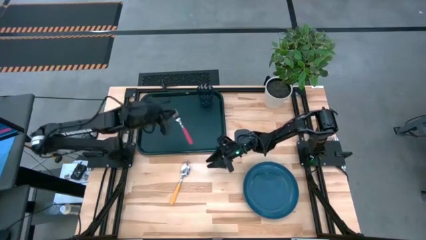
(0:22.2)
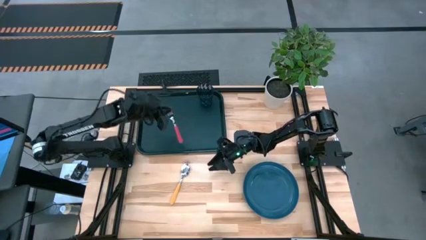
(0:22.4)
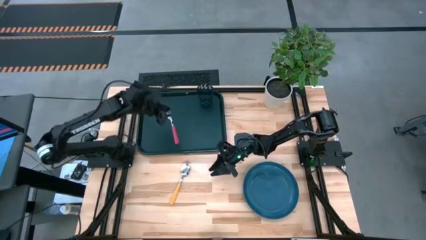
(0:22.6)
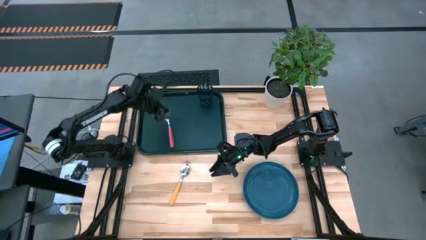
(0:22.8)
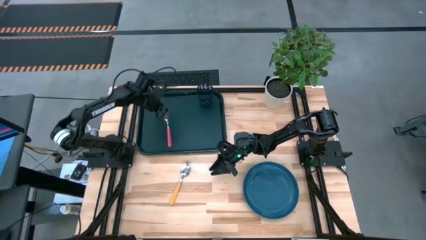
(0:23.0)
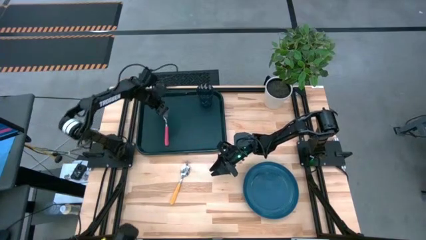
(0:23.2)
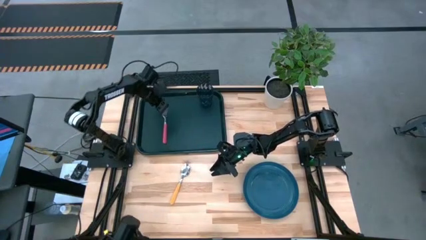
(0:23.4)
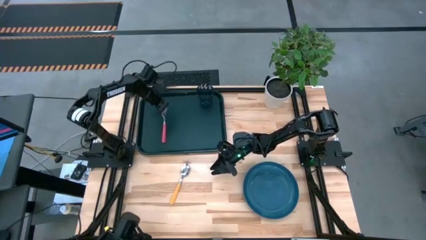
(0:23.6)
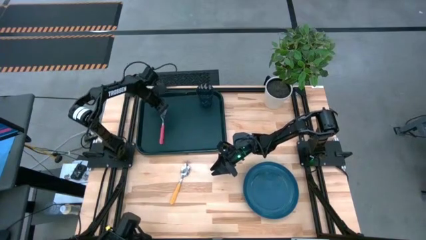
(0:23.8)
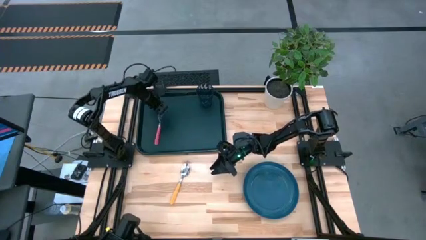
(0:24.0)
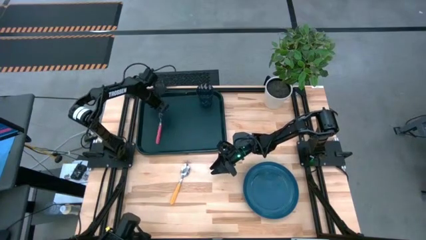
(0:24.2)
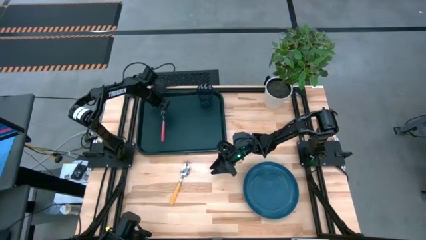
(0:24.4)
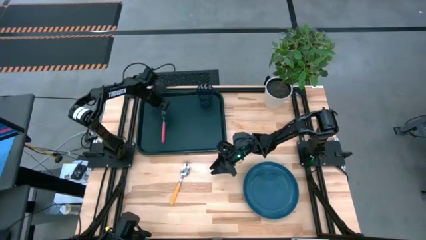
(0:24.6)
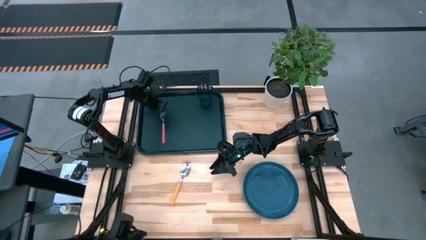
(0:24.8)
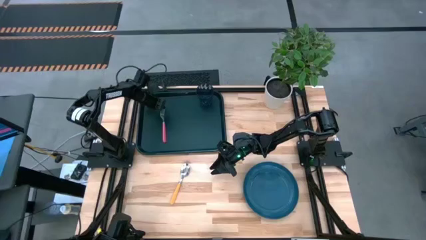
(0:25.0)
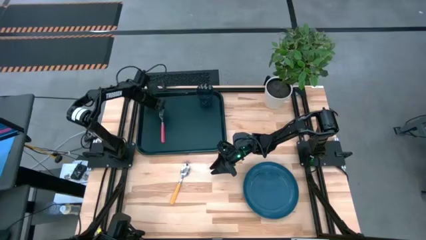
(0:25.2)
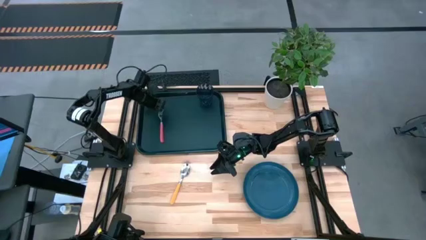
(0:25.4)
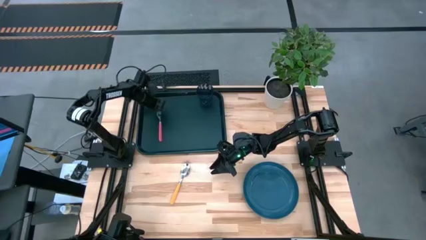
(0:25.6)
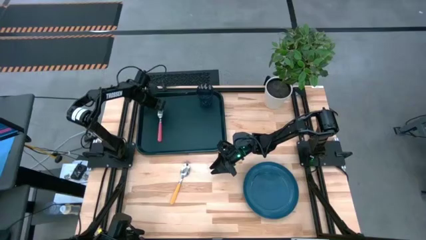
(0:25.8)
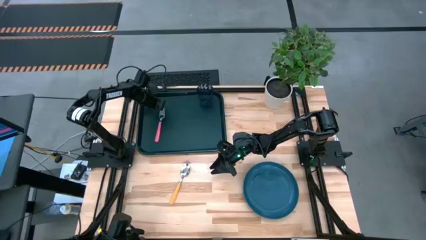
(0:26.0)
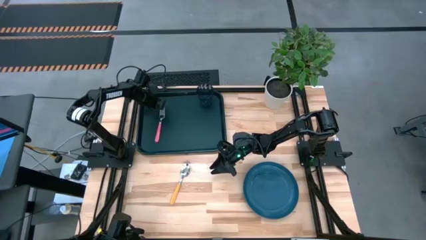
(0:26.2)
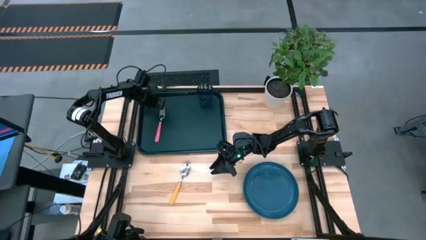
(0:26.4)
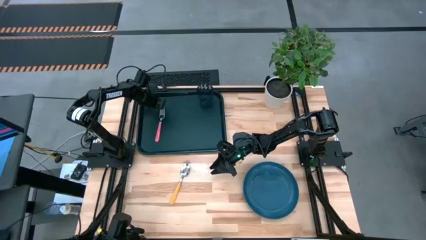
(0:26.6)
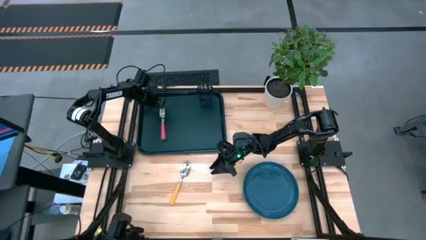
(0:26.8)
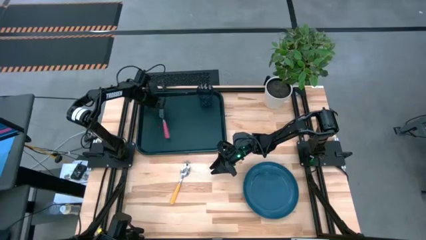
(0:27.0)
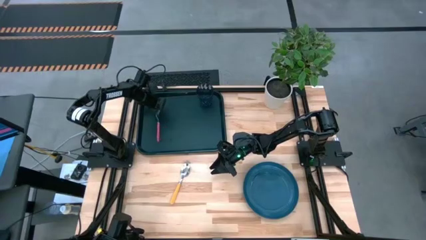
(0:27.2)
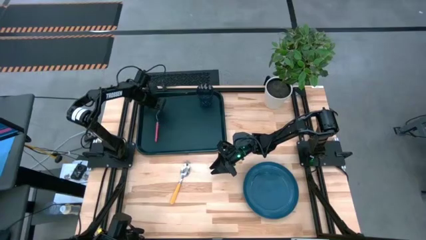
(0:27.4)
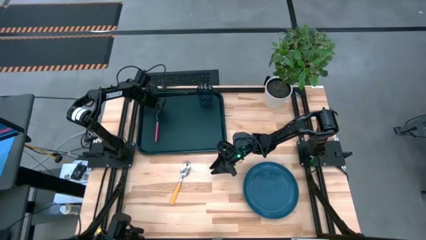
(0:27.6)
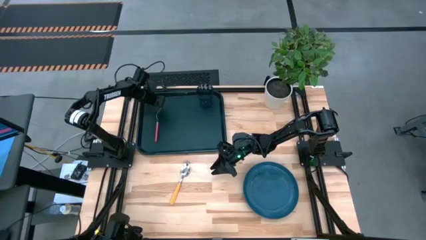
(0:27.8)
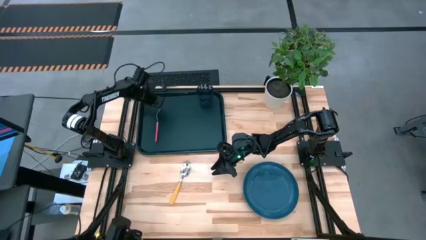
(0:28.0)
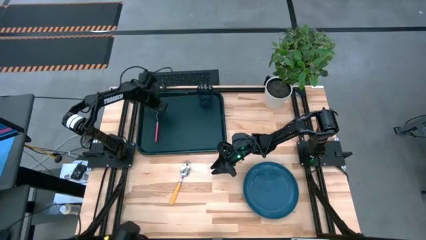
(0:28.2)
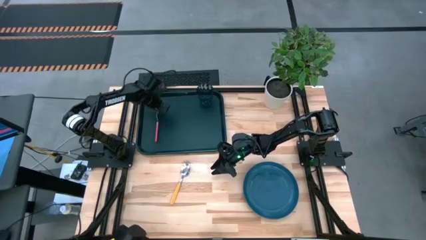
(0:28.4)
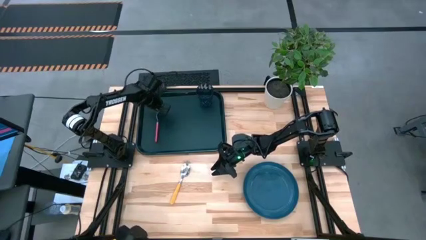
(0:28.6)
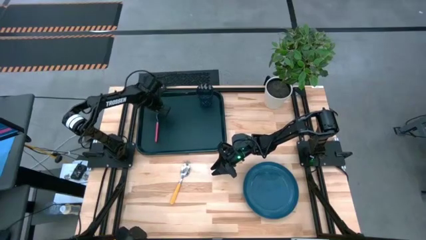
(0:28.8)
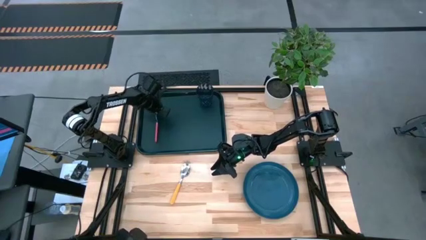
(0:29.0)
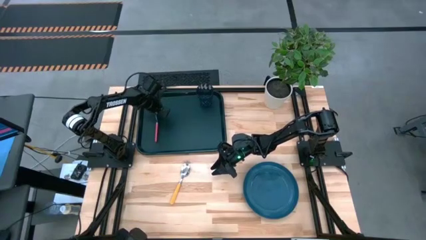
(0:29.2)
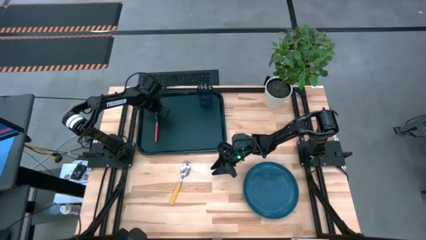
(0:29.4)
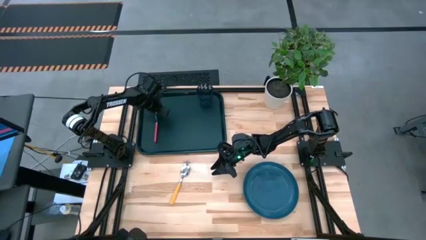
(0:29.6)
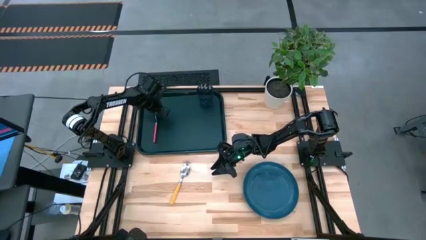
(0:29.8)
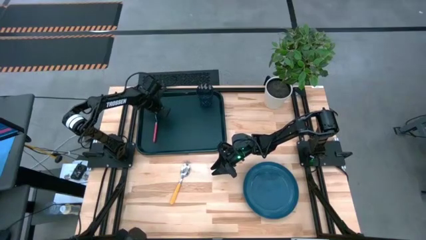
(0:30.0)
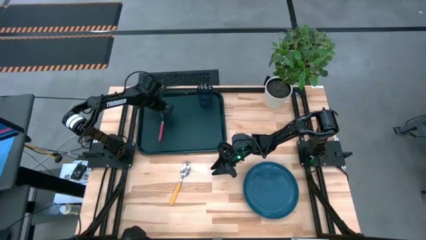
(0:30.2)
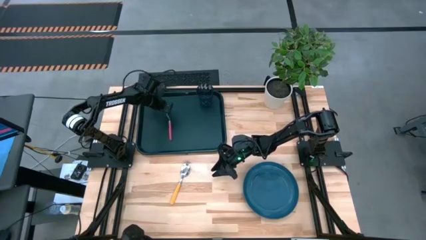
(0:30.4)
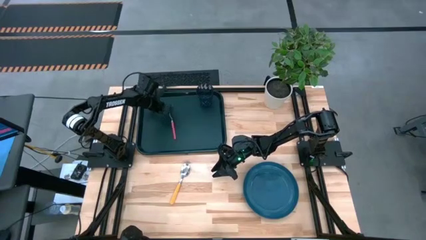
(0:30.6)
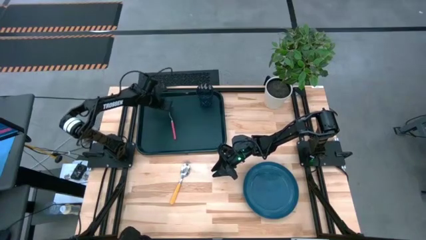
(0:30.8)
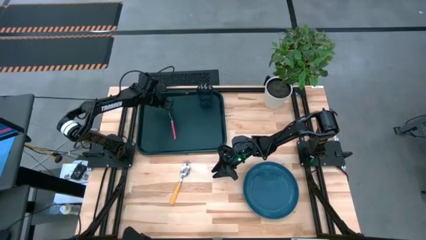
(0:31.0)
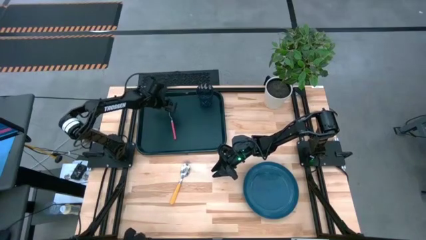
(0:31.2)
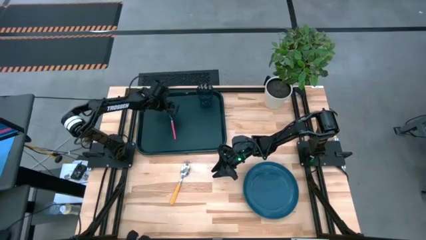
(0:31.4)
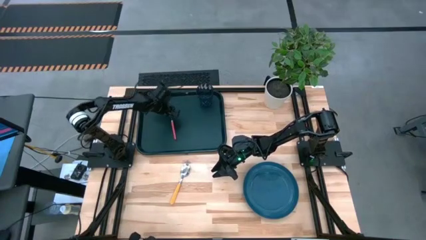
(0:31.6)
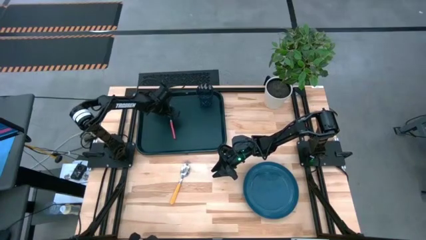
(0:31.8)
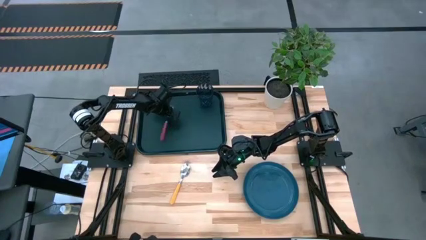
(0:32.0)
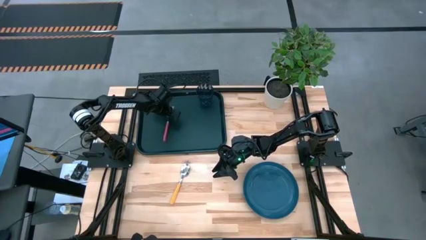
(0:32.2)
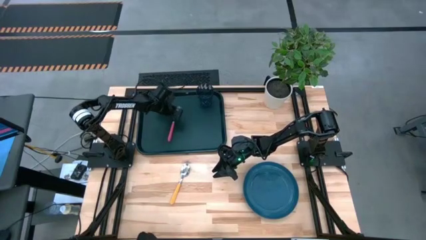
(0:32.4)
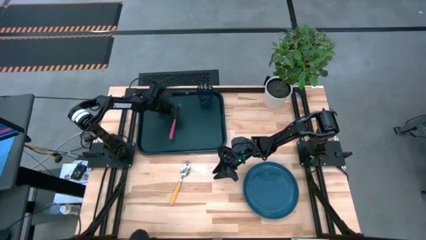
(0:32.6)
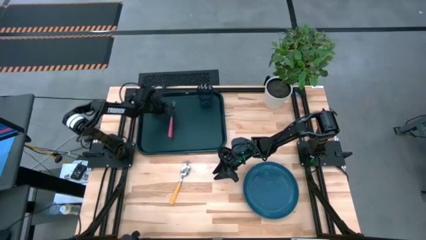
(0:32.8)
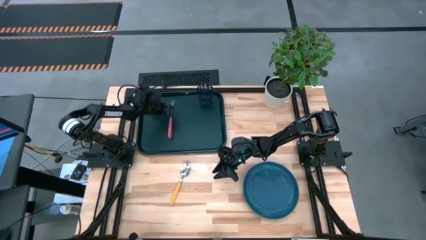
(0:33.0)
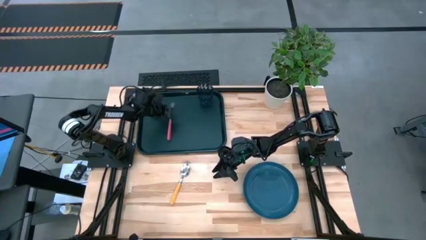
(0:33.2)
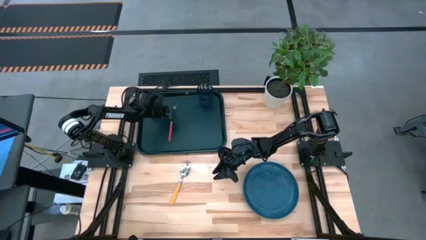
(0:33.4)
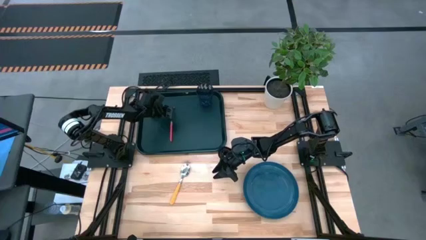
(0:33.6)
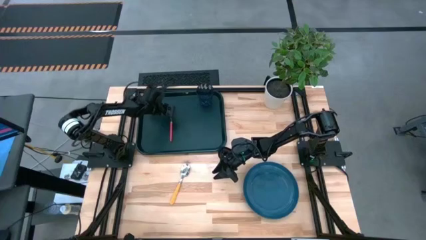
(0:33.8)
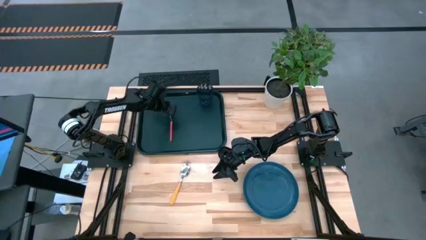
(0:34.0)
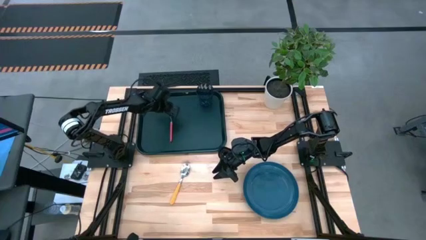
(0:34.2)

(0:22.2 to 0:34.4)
Task: Pick and place plate/cup/fork/spoon on tray
Put the pink fork on the black tray to the bottom left of the blue glass

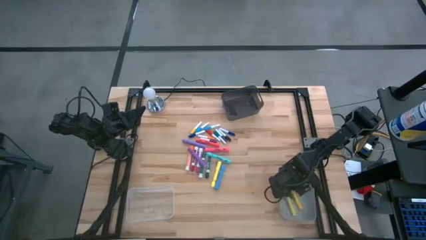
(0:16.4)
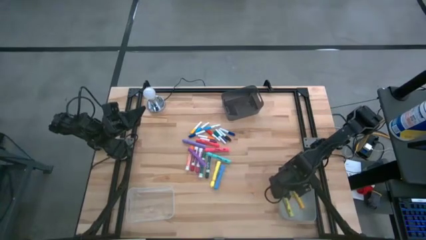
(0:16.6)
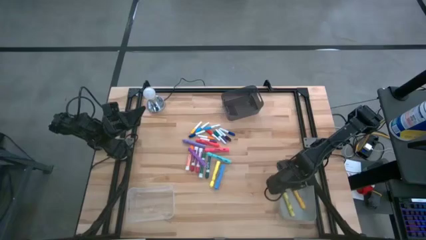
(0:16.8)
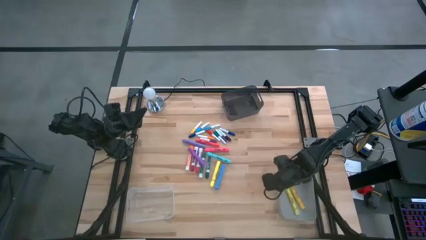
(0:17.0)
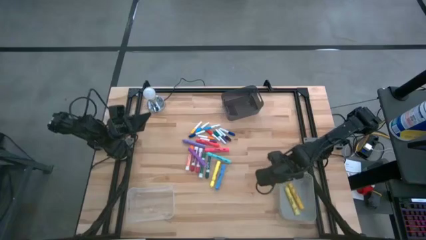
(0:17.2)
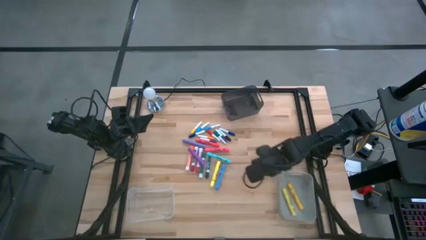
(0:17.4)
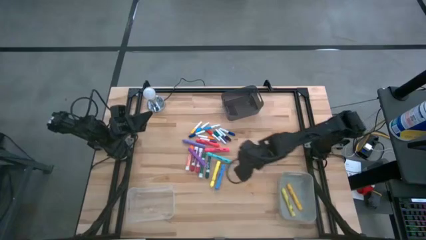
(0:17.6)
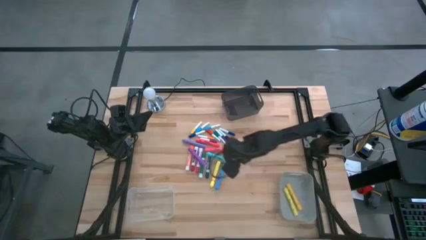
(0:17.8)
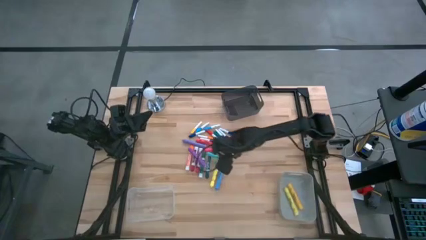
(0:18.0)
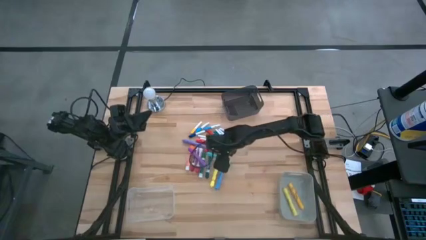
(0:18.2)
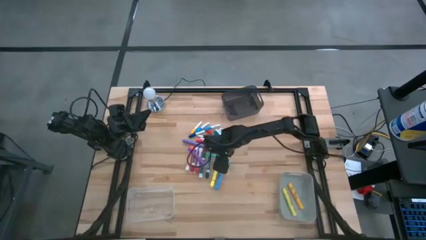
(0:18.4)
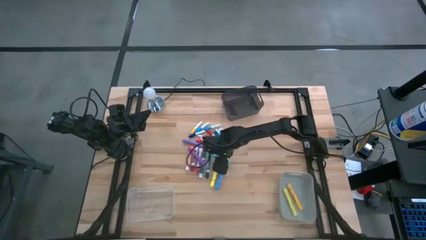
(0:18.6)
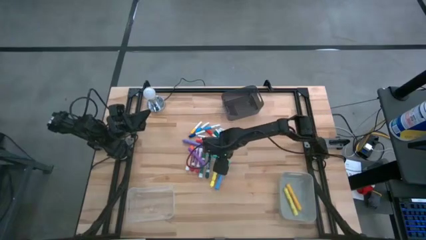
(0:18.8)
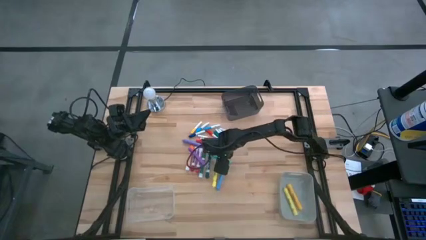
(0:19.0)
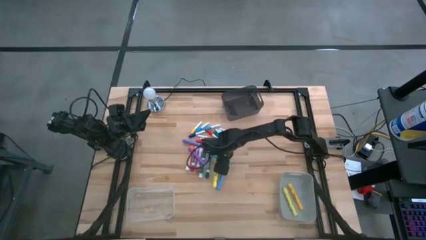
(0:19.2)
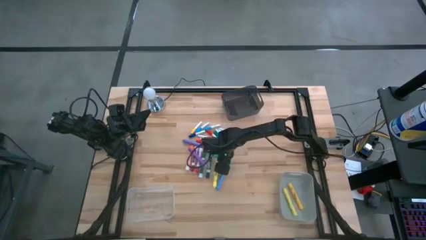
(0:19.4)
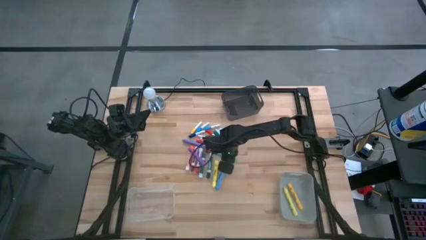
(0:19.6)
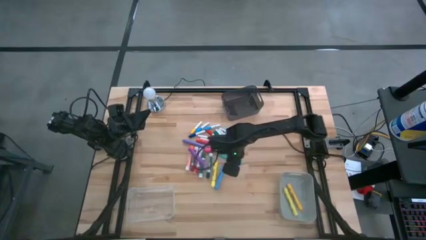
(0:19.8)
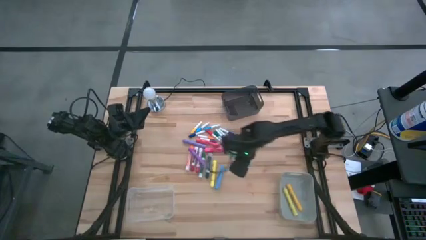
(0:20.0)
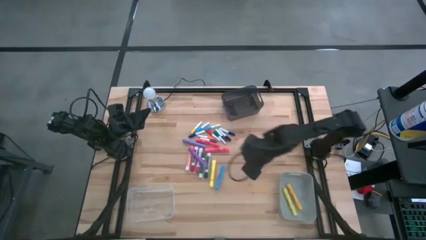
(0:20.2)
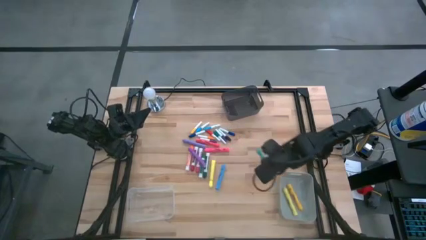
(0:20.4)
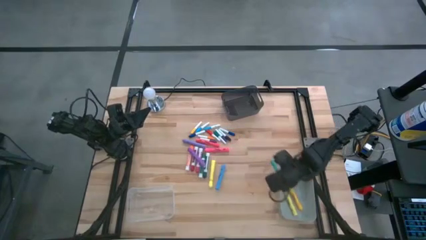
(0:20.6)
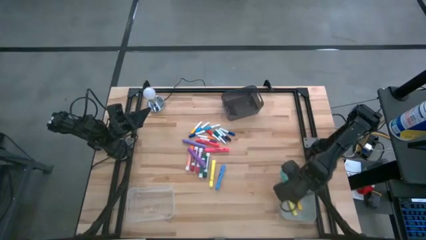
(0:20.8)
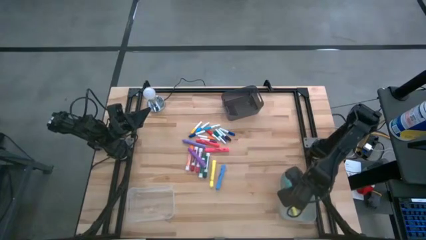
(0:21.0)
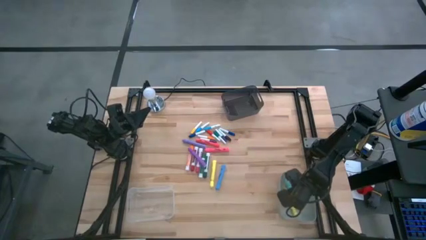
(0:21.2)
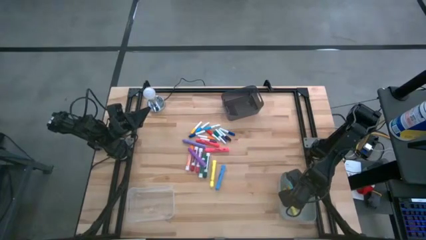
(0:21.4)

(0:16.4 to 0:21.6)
Task: Pick & Place Markers
Put the light blue highlighter pen into the gray bin
